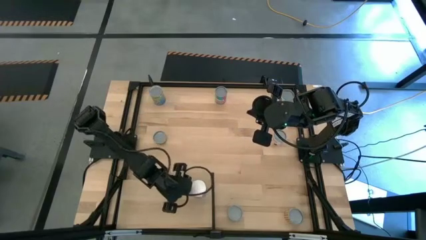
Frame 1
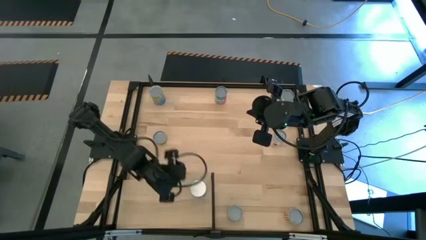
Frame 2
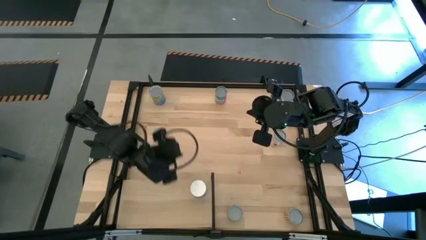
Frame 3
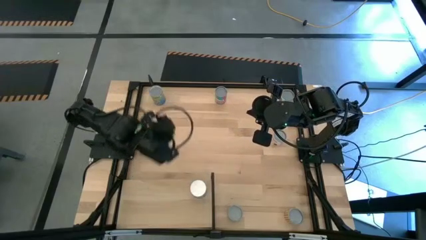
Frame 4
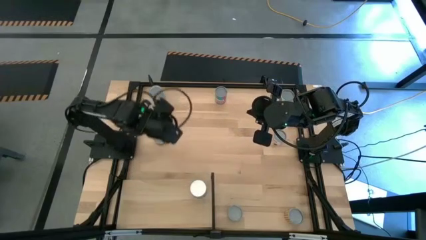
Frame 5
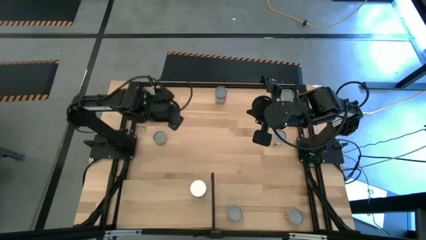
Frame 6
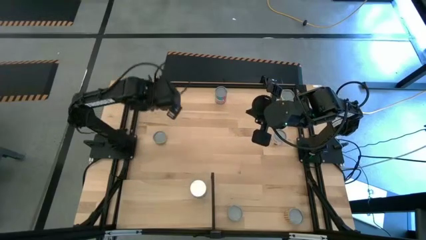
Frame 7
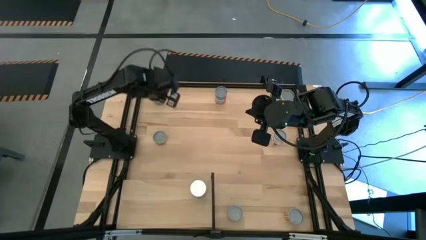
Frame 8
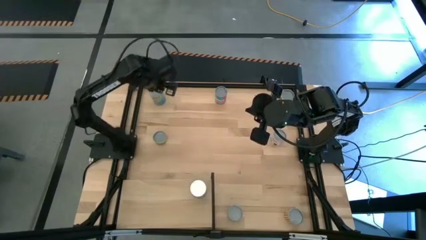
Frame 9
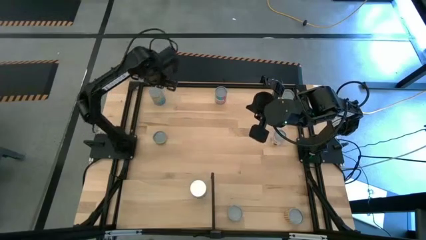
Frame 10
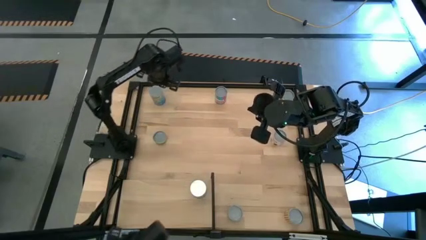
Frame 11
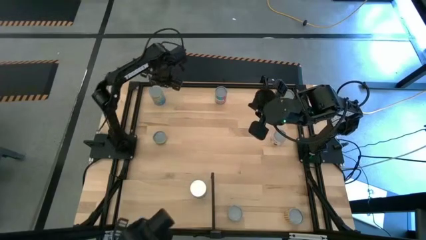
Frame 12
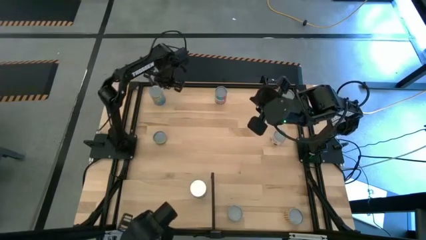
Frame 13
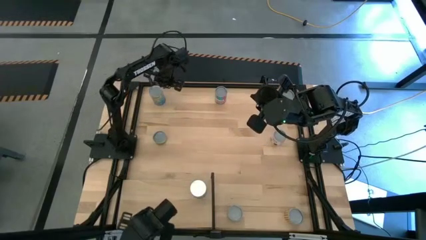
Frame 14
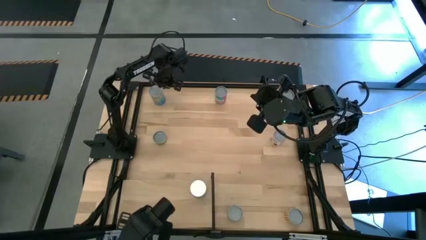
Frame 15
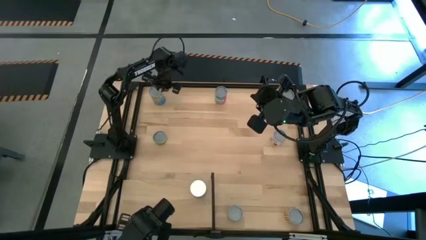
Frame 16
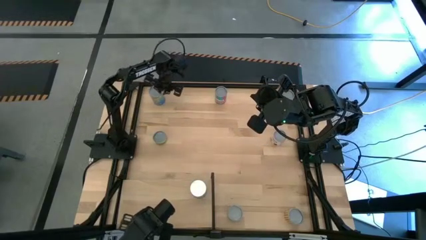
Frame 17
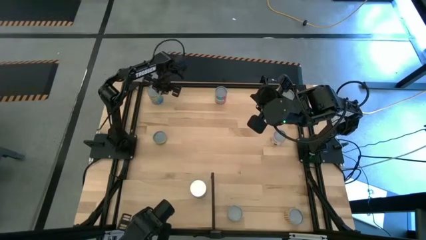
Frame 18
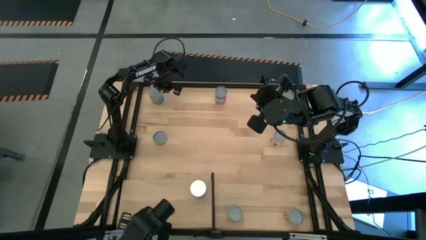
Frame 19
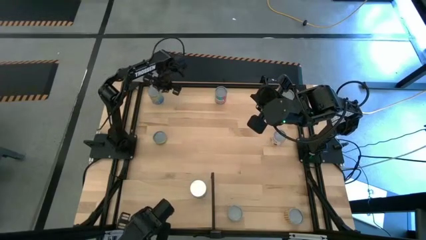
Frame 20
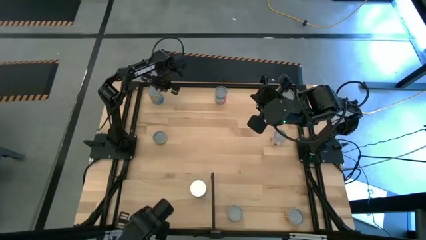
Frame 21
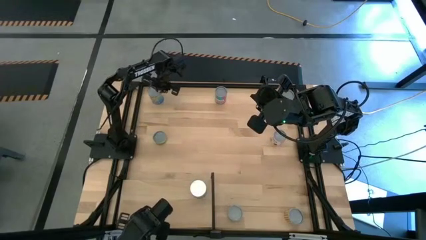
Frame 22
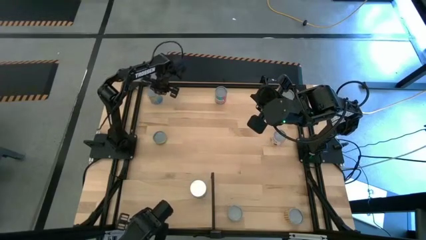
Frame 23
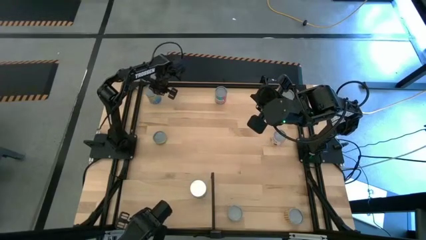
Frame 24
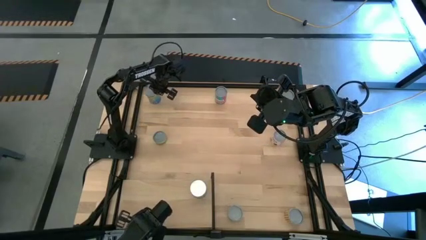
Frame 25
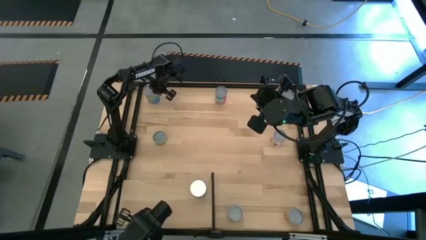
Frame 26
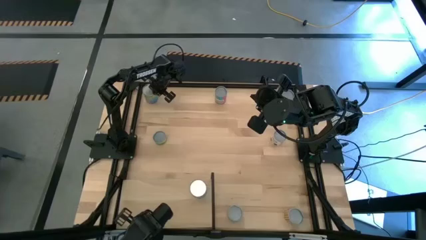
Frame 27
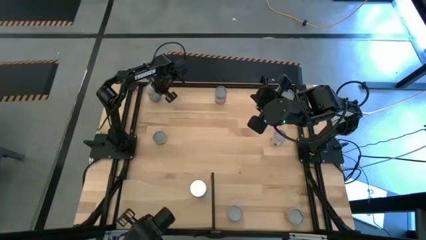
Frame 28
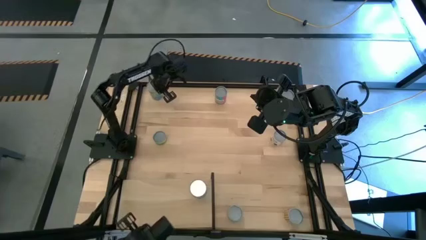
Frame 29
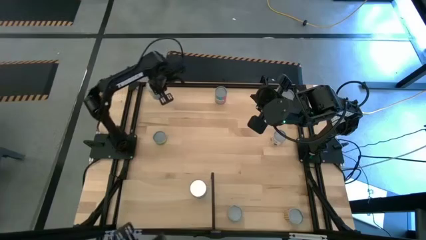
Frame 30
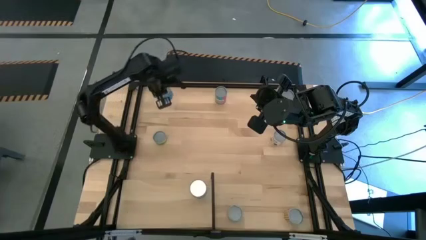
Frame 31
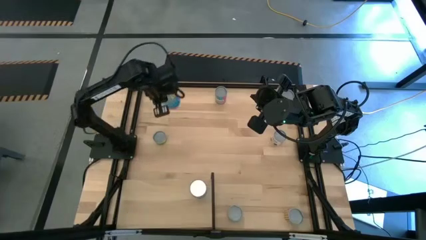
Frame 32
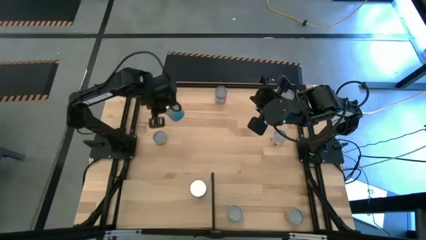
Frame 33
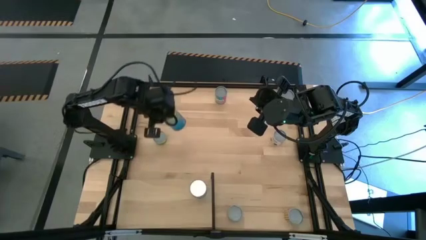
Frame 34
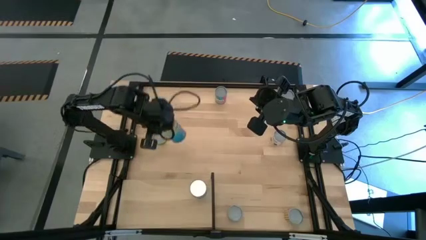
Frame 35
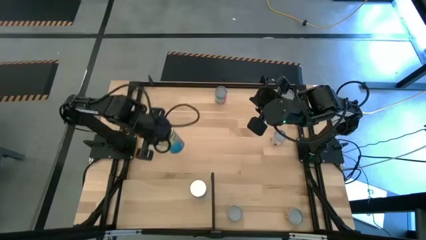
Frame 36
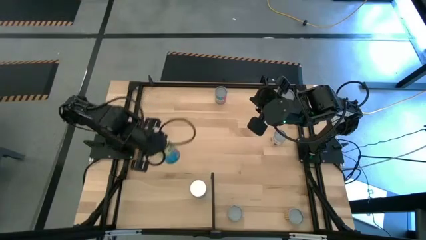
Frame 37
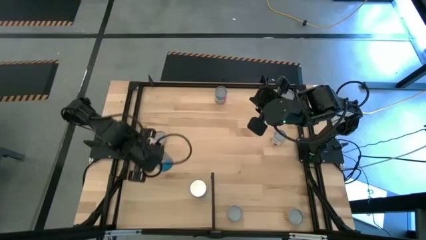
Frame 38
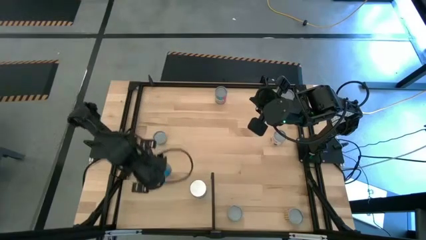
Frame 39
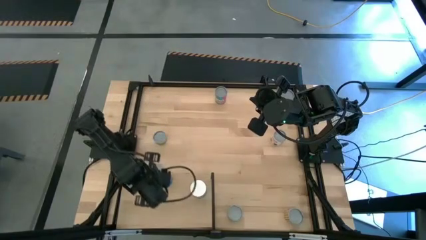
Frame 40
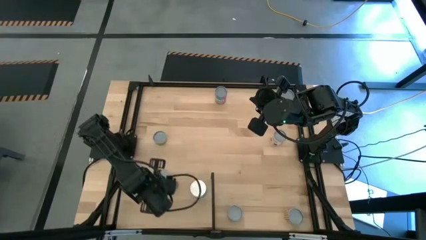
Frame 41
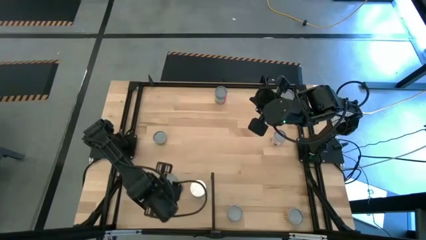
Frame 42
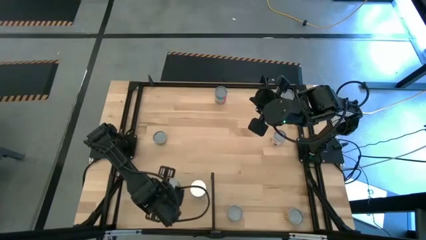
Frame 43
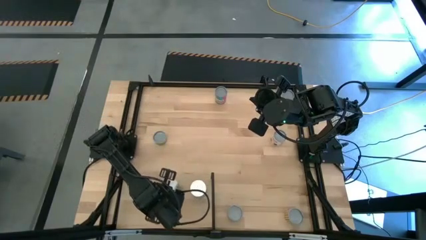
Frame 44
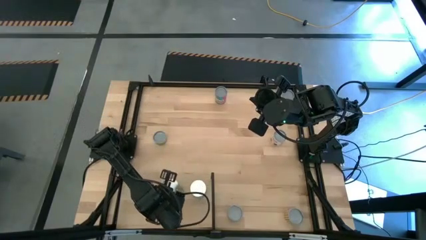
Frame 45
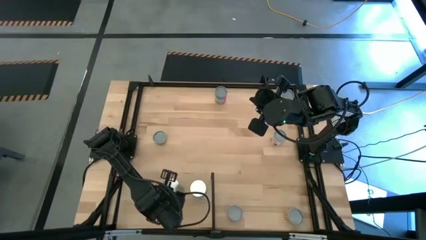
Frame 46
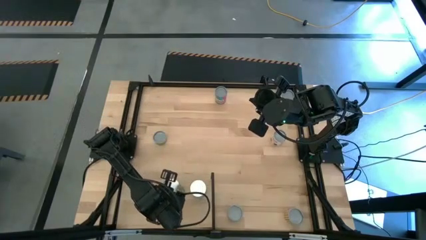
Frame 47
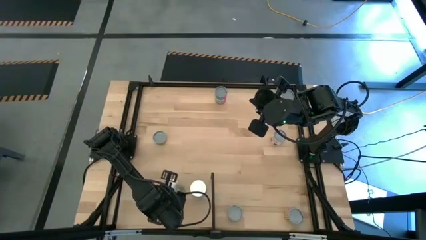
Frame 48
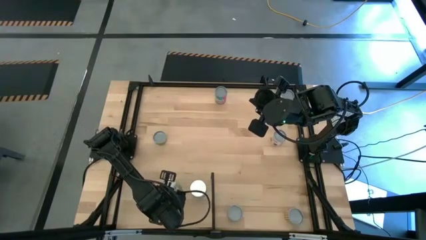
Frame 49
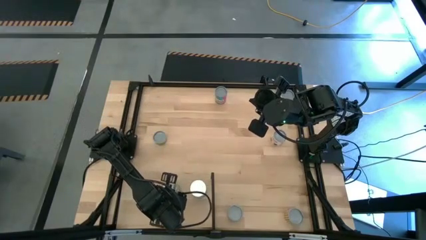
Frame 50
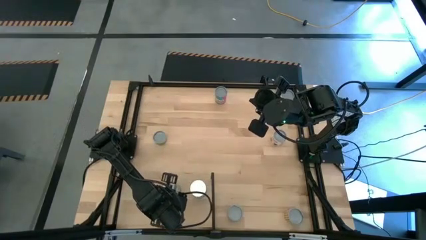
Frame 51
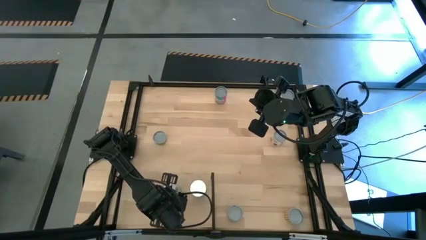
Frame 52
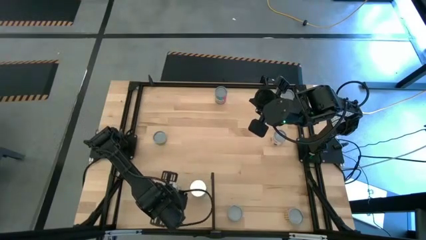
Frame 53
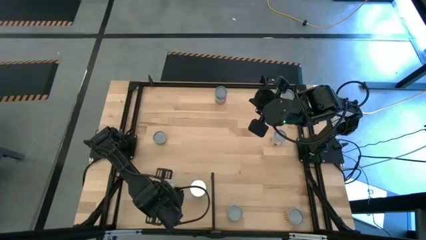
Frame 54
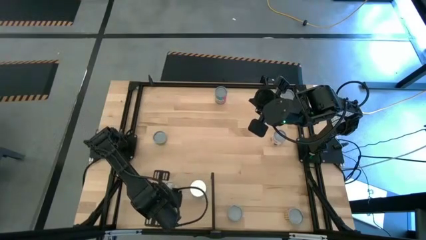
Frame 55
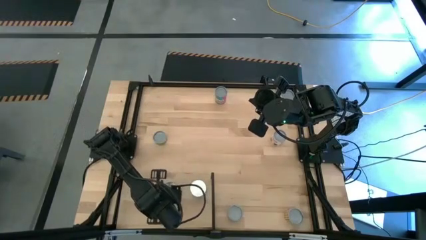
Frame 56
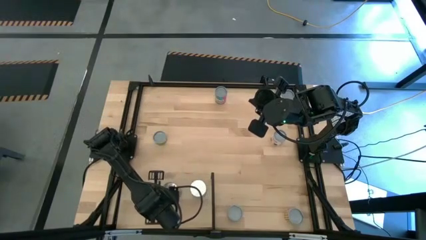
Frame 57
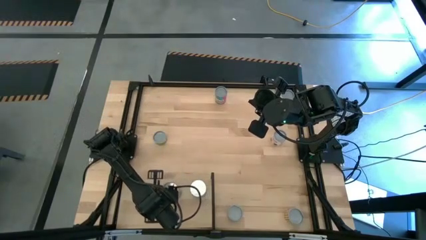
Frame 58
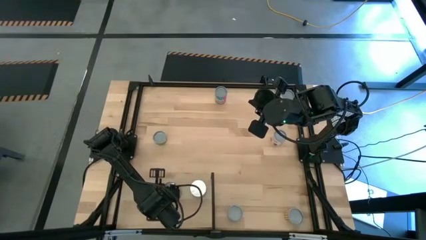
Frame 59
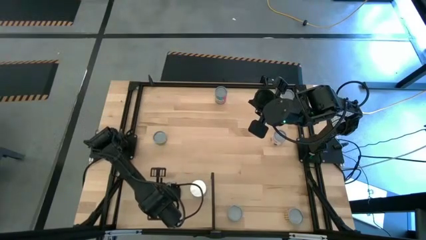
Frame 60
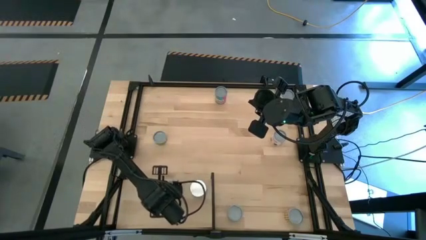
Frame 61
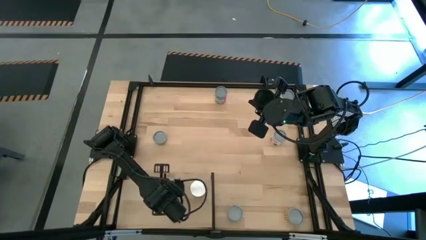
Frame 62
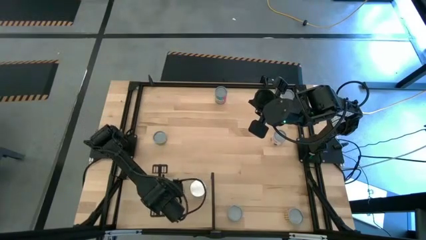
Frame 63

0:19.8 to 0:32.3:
Task: Pick and place cans onto a shelf
Put the canned cherries on the shelf

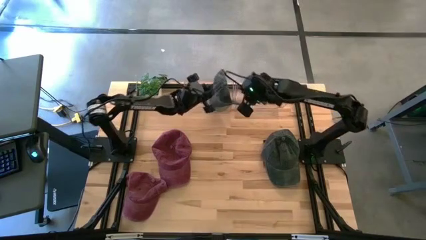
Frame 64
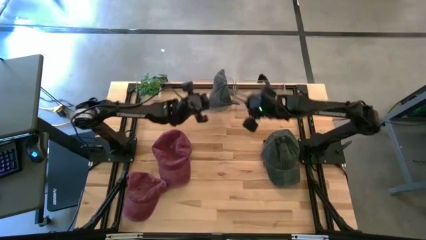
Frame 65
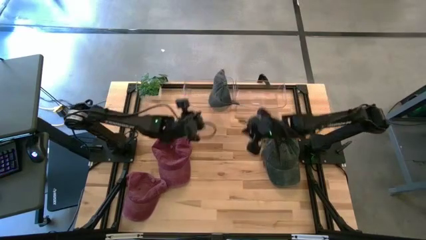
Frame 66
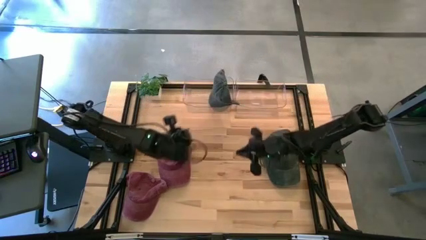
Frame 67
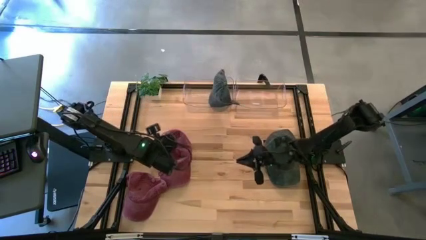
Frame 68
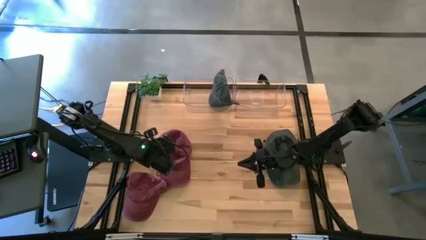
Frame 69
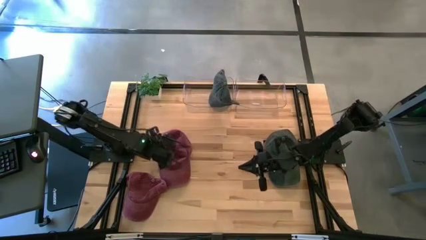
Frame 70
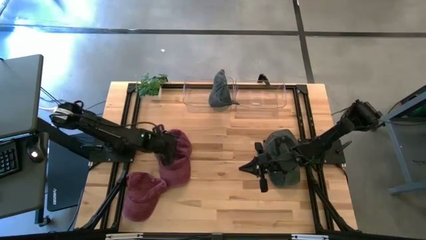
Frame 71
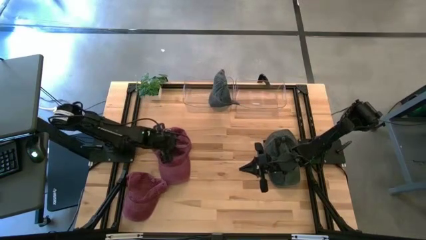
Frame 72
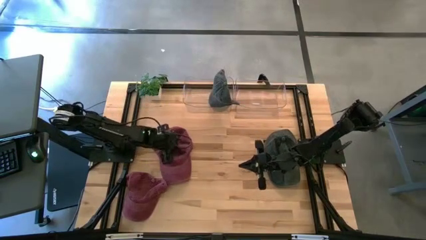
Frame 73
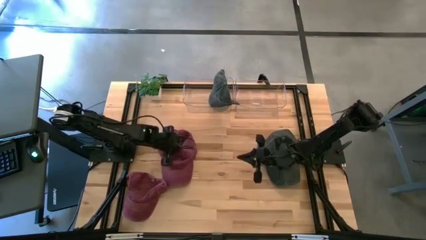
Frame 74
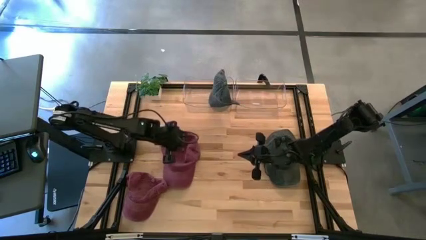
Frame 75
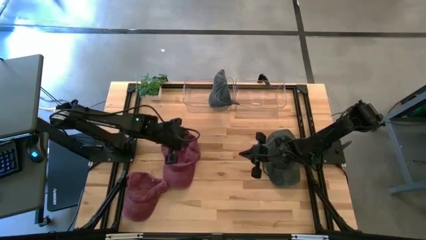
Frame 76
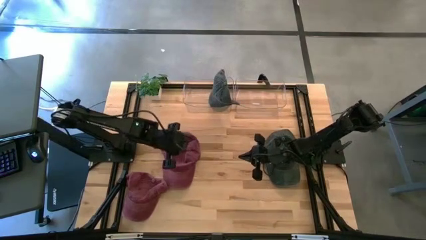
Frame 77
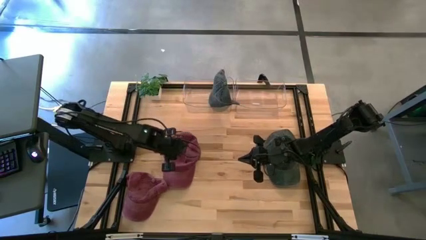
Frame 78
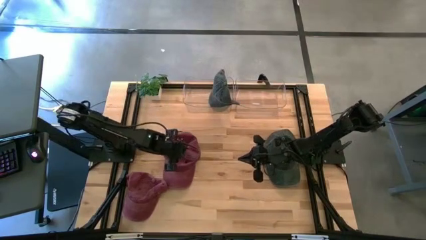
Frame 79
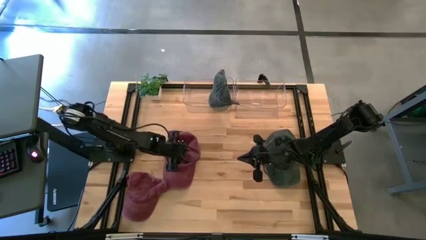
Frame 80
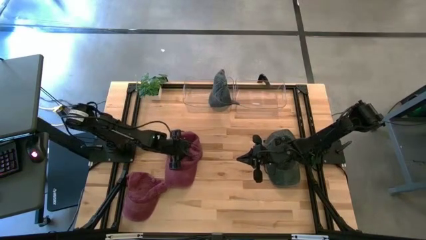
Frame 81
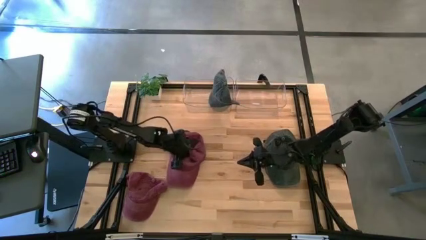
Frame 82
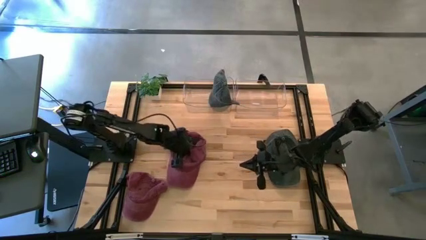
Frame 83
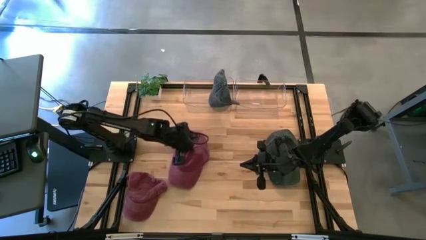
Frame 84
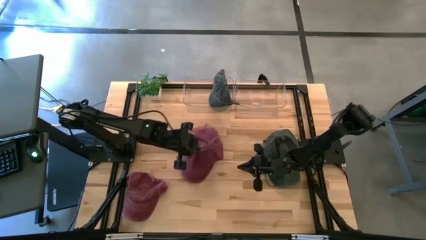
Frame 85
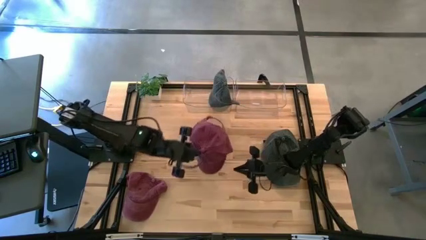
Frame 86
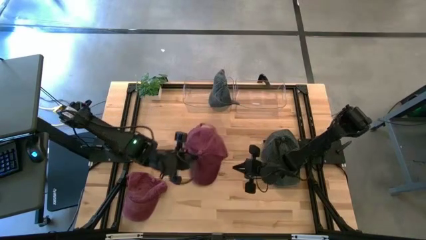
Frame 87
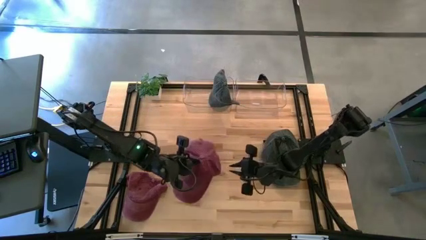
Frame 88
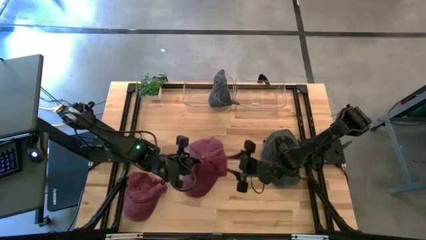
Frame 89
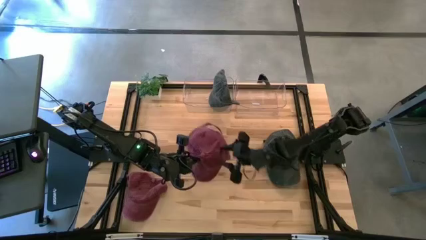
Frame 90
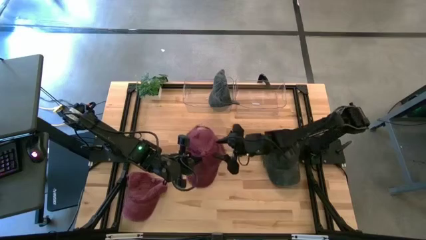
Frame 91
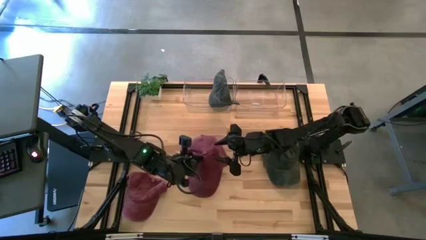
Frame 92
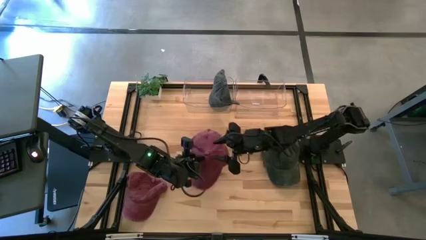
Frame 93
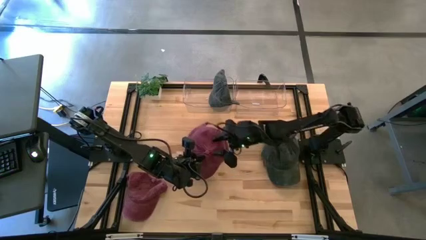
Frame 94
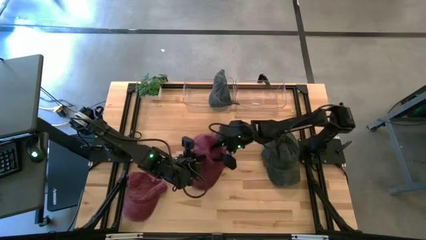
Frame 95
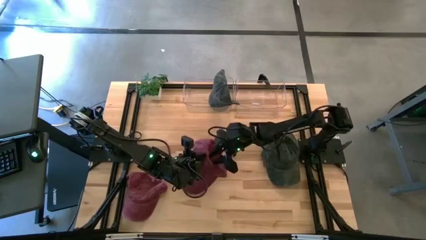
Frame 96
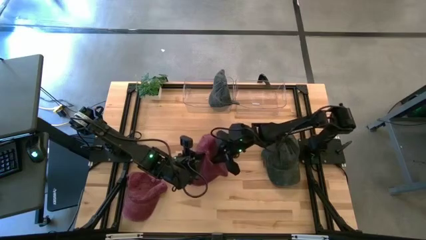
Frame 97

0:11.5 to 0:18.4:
Task: Pick & Place hat
Put the right red cap into the right transparent bin
